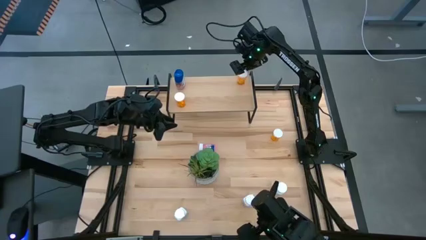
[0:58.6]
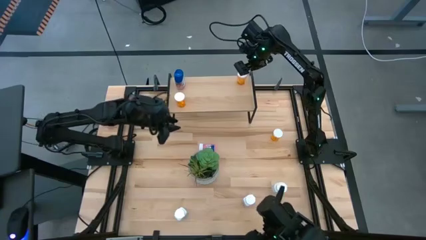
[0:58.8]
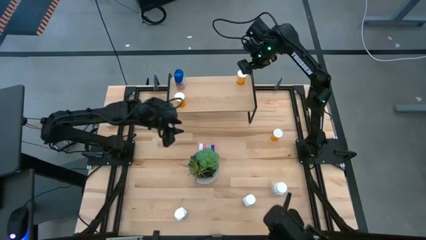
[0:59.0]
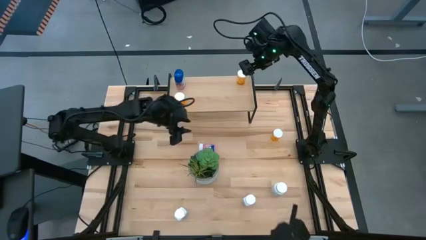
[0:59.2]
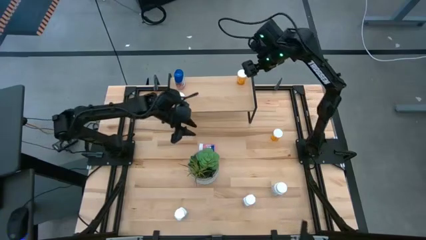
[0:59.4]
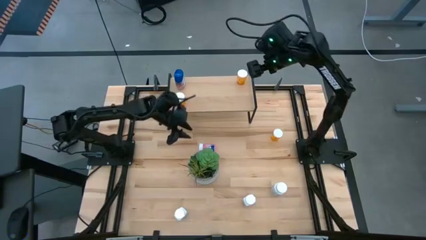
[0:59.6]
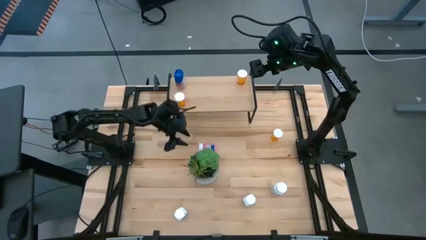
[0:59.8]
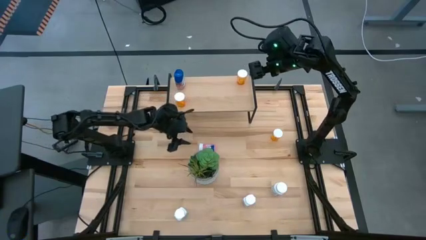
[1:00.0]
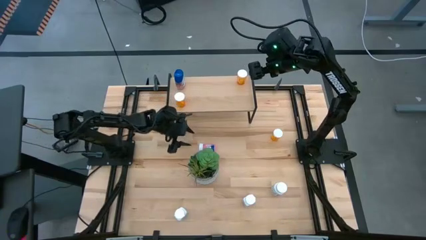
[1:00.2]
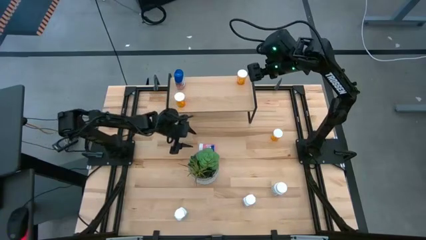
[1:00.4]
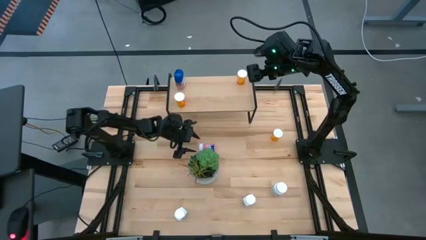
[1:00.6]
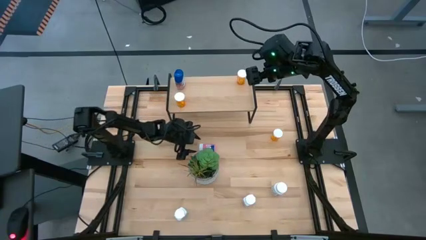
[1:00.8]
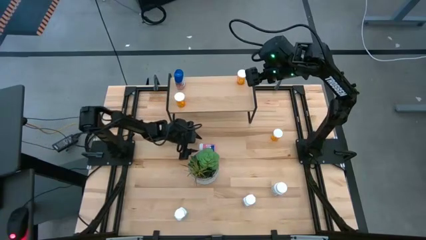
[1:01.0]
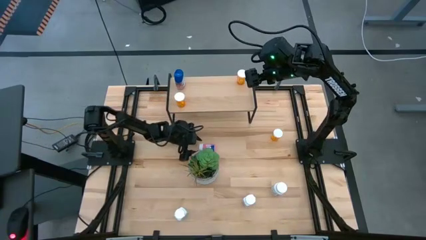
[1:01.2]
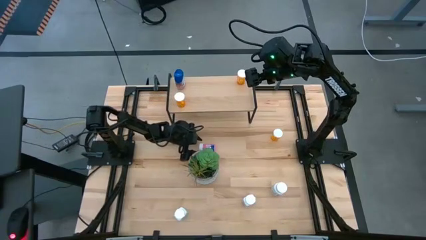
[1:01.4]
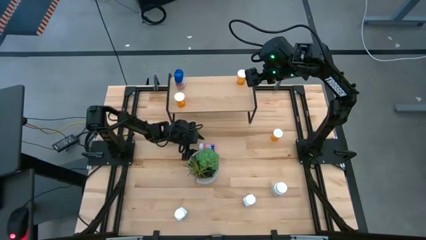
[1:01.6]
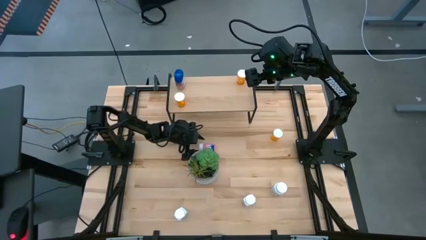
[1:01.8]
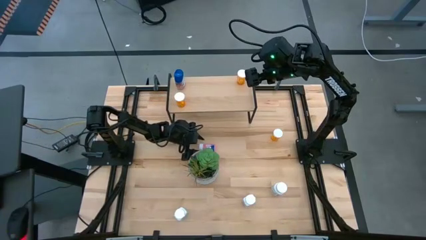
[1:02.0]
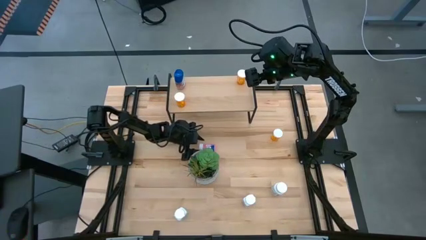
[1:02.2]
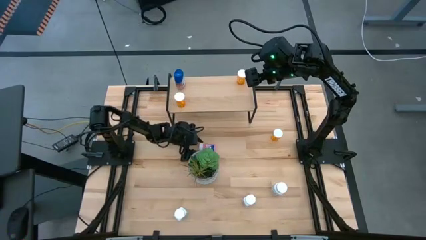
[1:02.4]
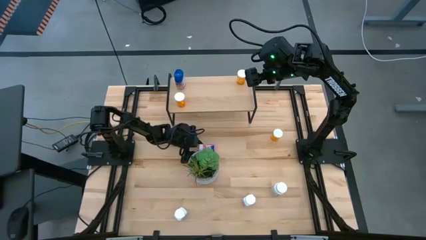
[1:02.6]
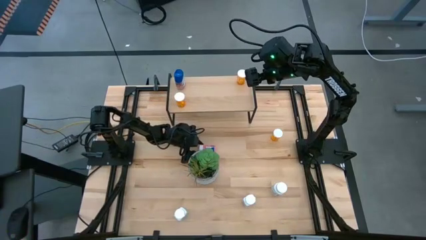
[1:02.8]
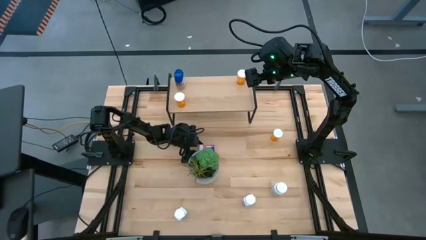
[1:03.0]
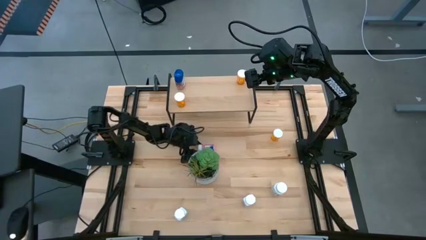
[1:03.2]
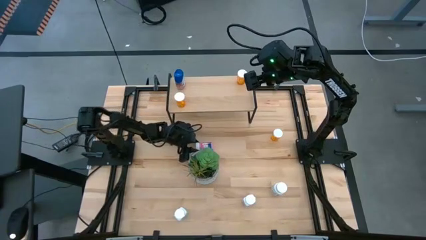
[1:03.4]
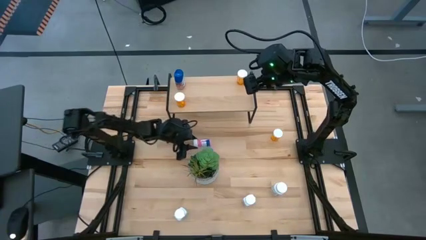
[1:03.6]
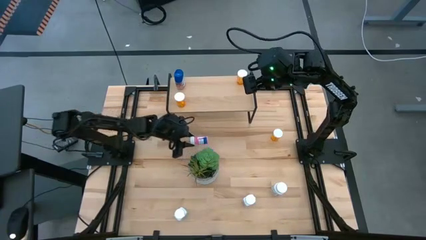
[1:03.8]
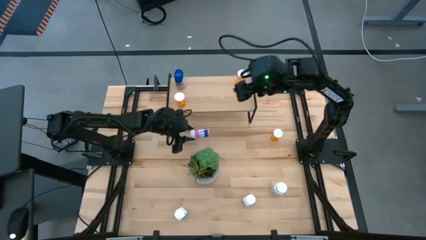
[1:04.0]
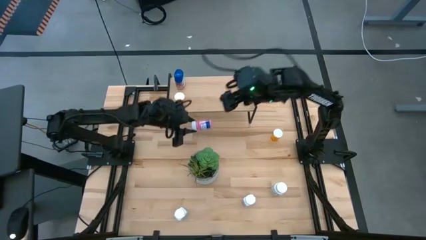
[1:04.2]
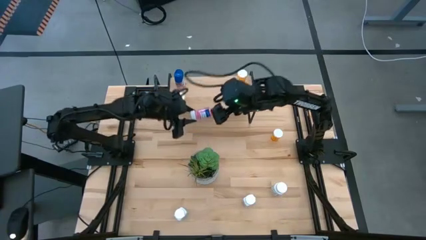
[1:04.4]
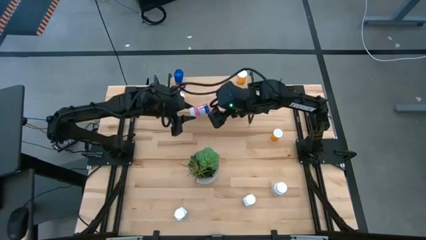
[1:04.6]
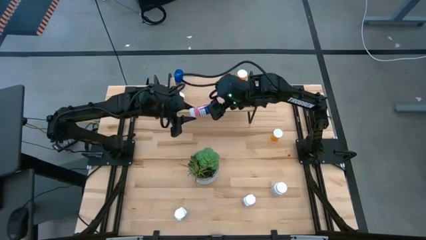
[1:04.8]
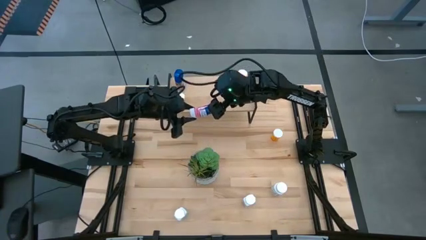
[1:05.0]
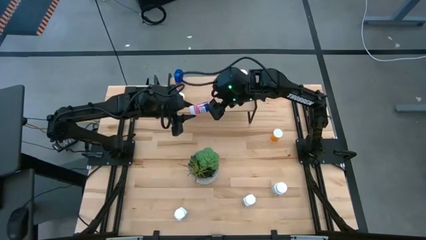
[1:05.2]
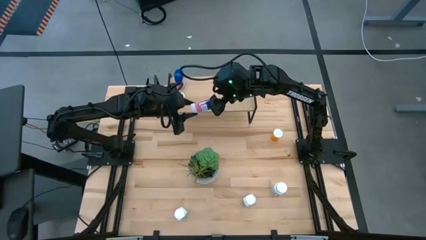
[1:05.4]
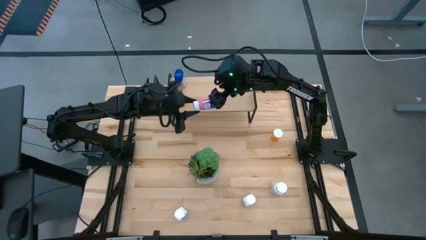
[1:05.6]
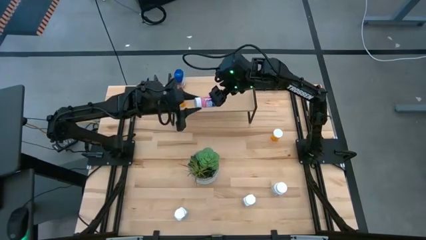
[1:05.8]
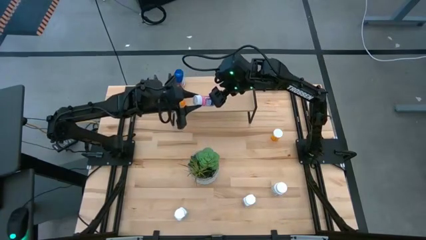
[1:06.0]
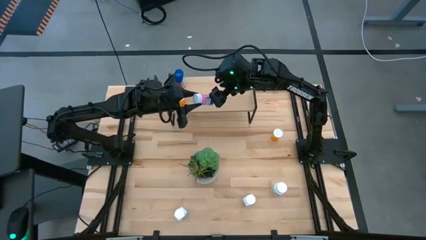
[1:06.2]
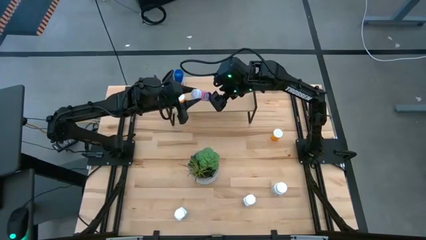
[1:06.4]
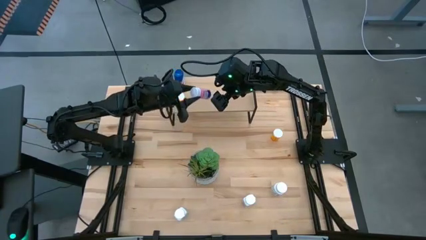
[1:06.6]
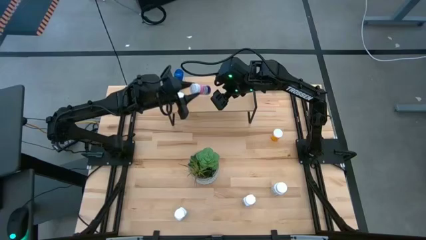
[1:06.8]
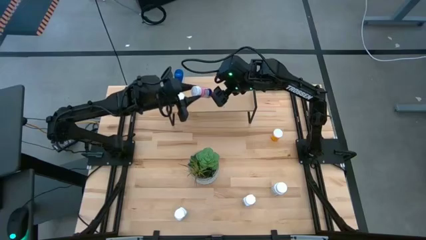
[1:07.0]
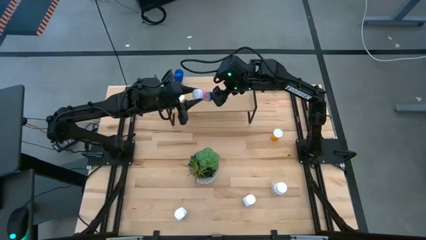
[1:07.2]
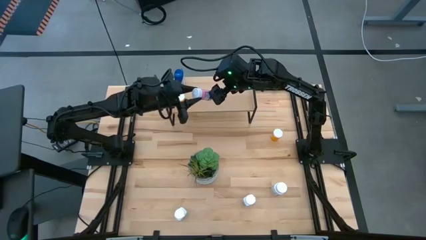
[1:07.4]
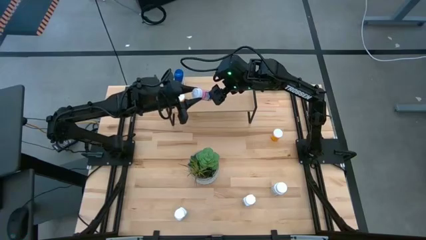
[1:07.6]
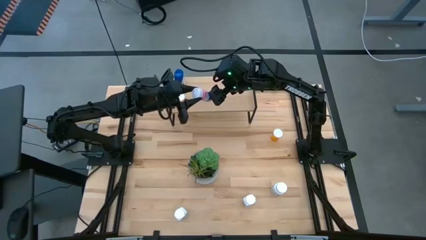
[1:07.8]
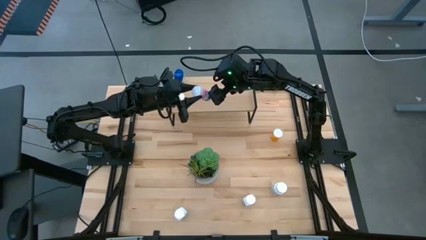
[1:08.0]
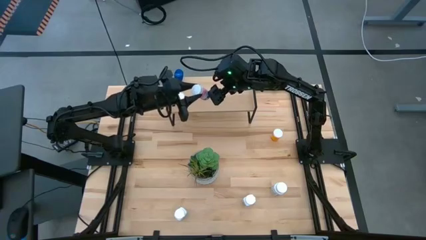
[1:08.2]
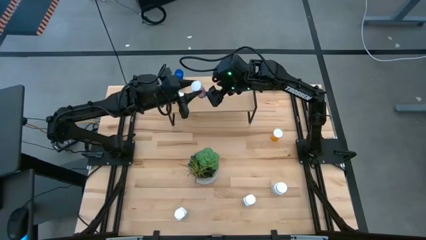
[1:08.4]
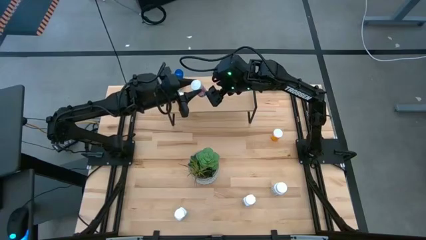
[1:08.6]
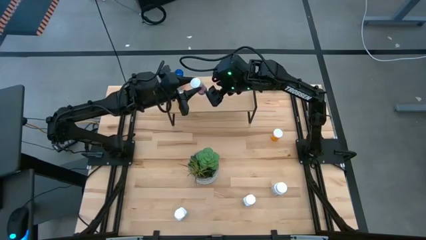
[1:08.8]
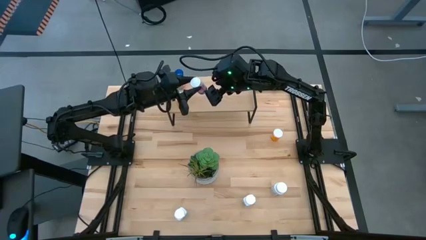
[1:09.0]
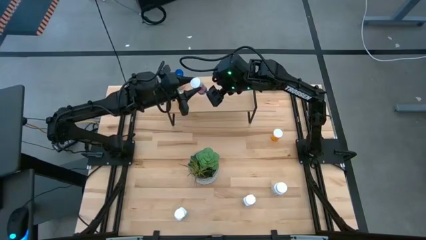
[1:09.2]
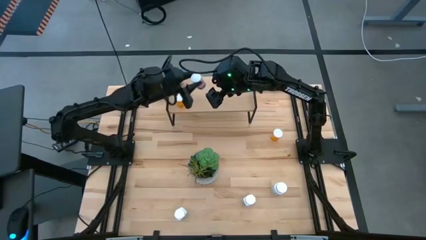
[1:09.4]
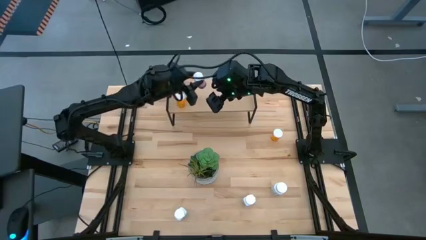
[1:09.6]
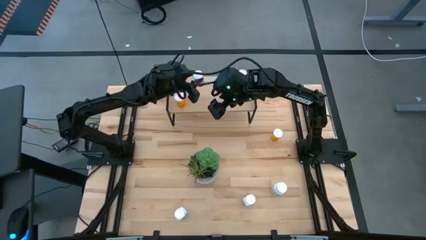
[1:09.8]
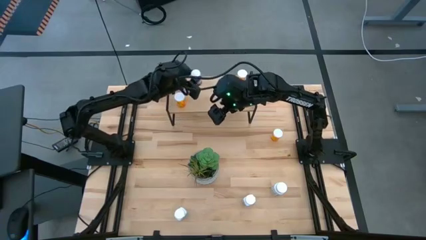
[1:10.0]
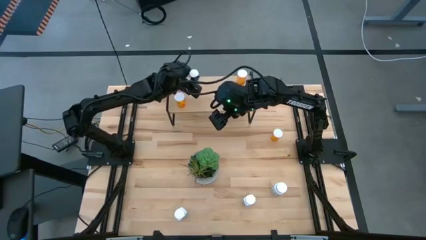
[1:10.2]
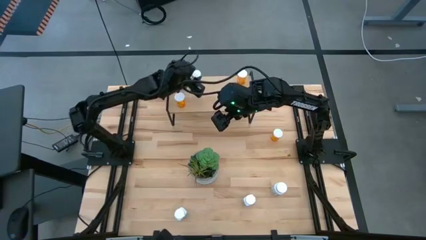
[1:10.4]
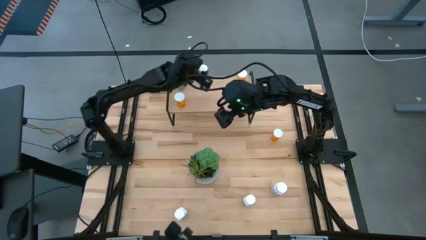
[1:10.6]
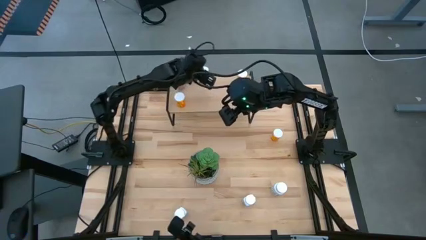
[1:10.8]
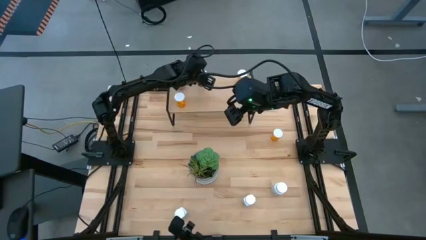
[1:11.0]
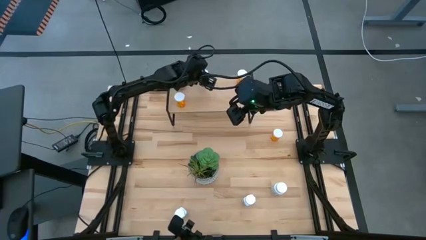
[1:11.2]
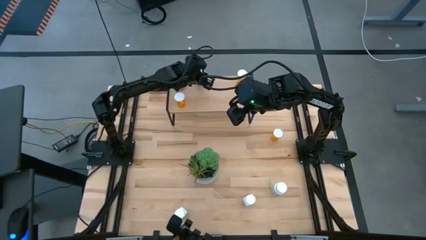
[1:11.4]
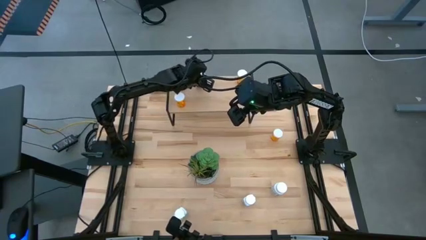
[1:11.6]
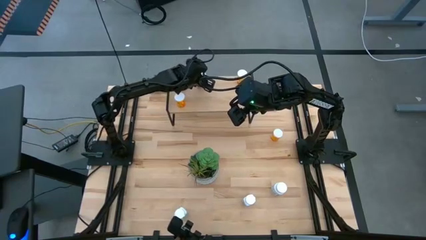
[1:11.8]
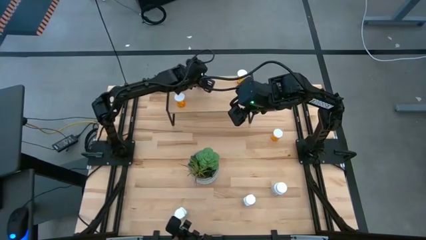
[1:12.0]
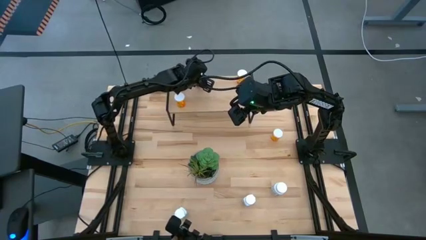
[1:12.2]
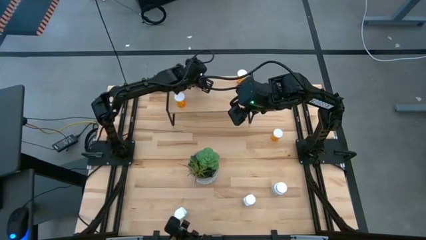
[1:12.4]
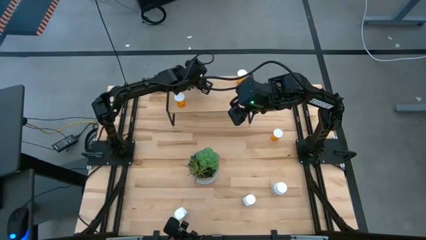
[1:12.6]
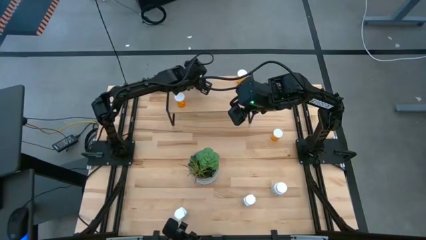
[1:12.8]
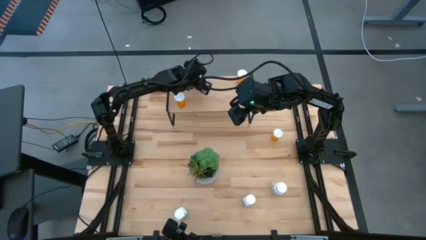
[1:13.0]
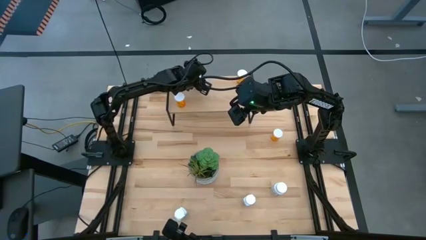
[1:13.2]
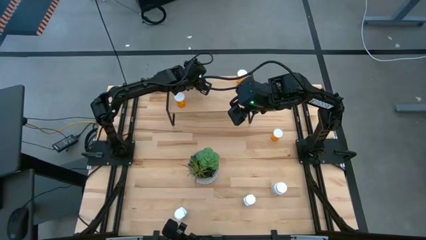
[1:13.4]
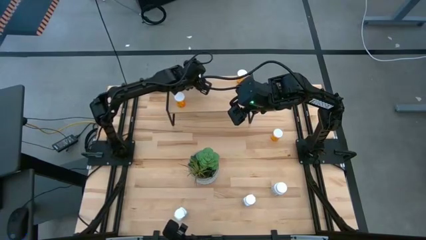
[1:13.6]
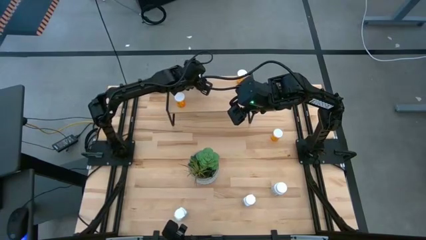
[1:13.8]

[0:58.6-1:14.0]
Task: Pick and place medicine bottles onto shelf by color
Put the pink pill bottle on the shelf
